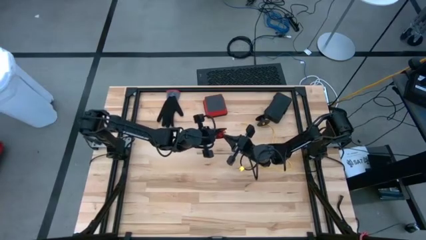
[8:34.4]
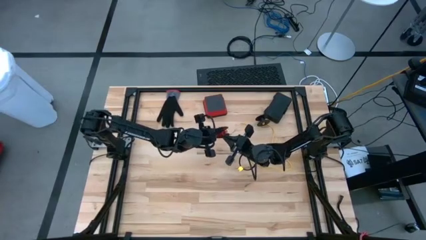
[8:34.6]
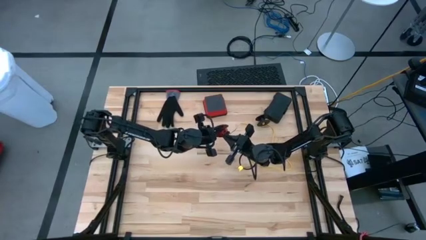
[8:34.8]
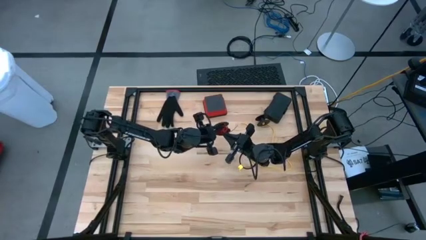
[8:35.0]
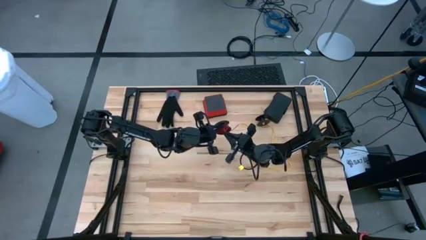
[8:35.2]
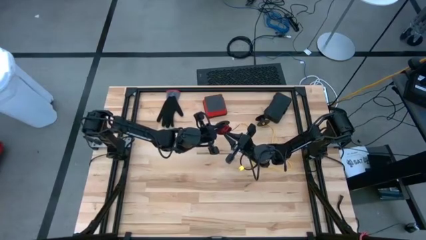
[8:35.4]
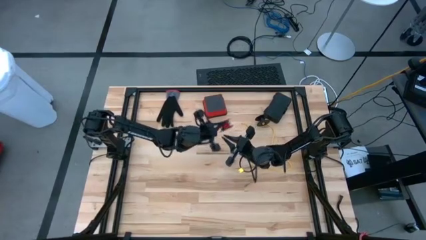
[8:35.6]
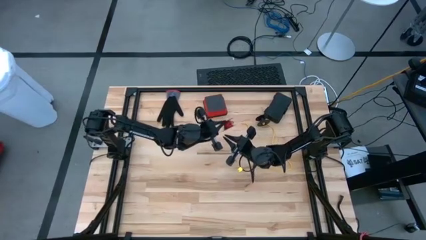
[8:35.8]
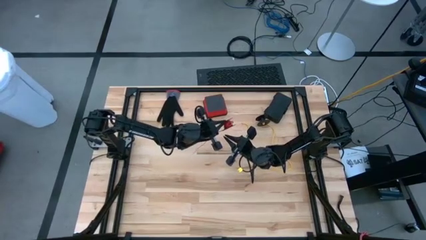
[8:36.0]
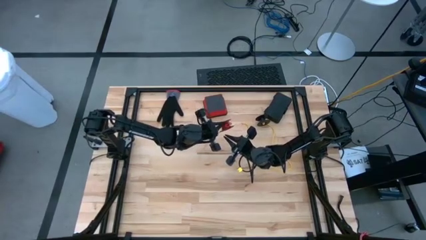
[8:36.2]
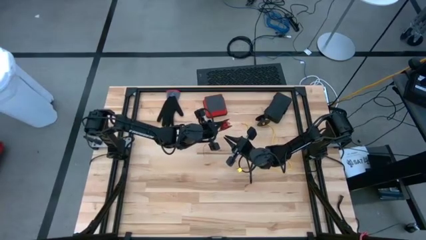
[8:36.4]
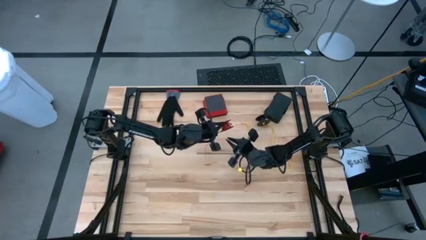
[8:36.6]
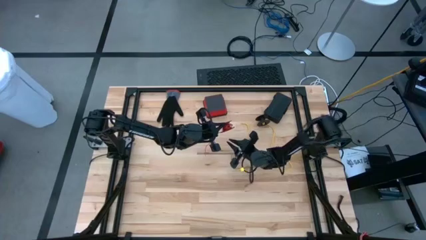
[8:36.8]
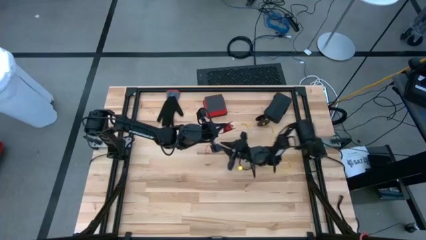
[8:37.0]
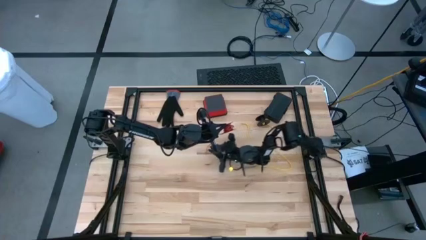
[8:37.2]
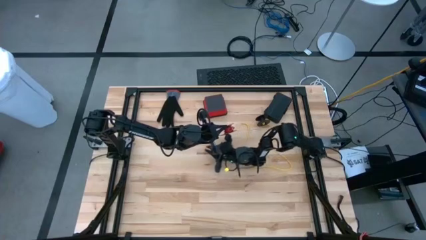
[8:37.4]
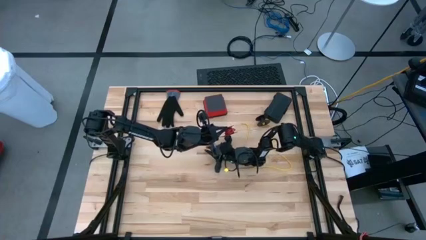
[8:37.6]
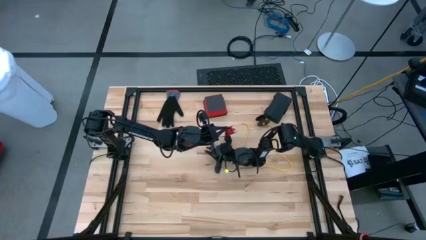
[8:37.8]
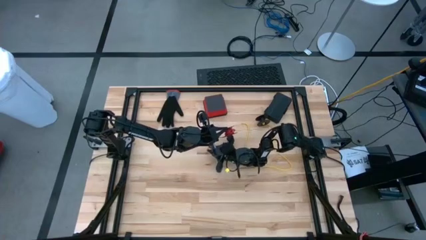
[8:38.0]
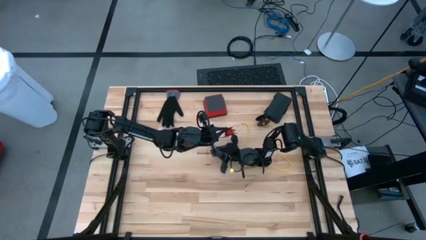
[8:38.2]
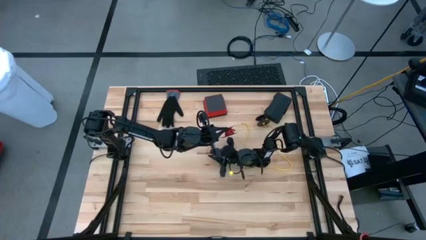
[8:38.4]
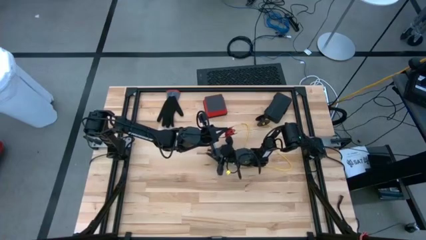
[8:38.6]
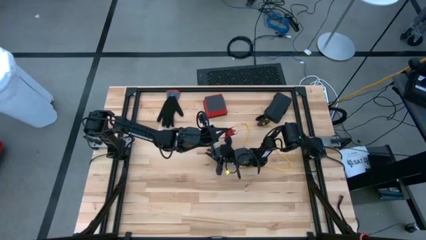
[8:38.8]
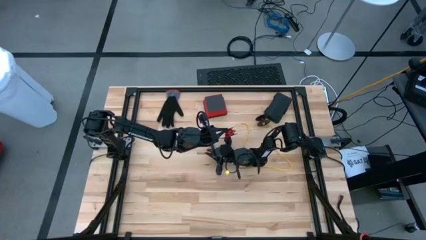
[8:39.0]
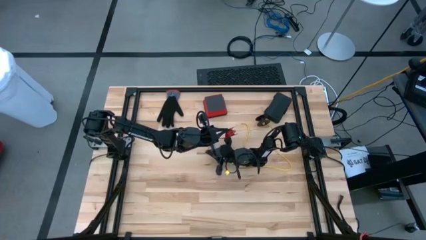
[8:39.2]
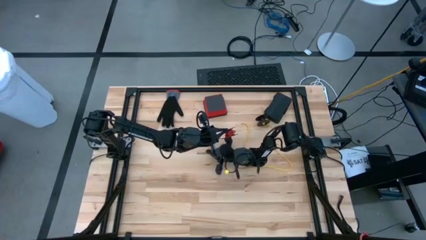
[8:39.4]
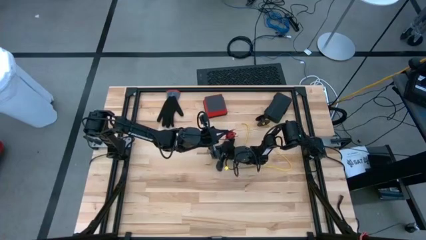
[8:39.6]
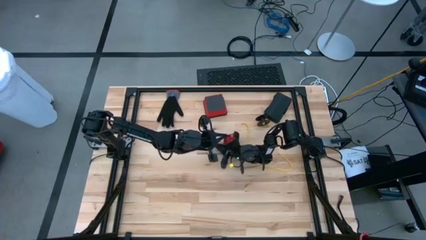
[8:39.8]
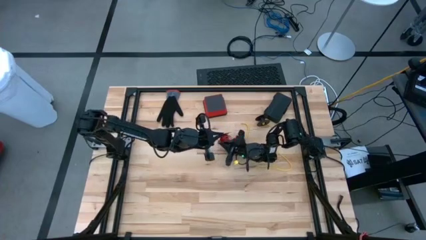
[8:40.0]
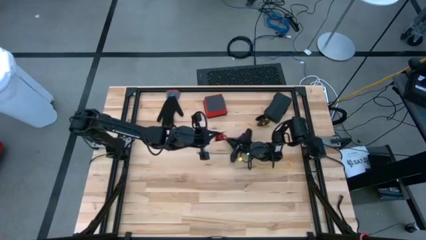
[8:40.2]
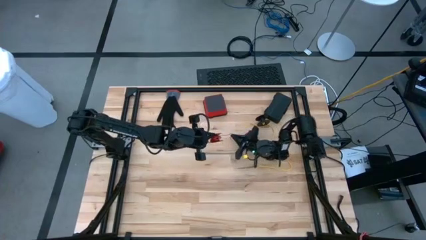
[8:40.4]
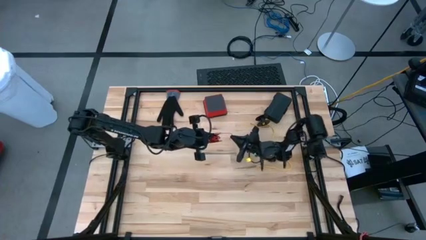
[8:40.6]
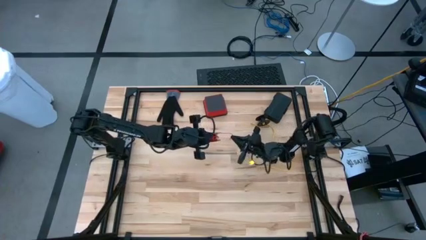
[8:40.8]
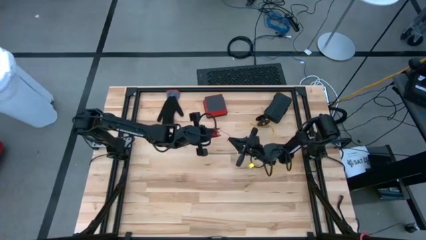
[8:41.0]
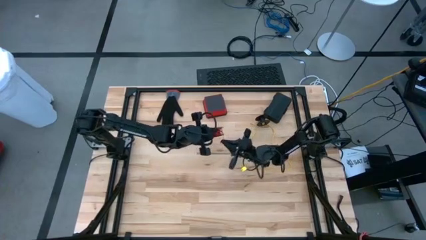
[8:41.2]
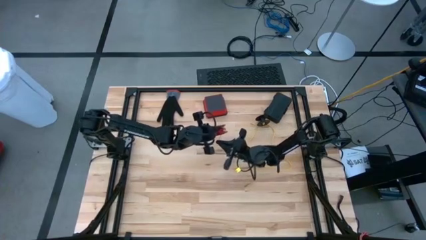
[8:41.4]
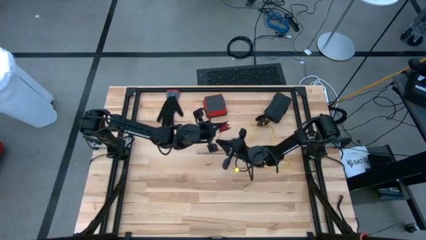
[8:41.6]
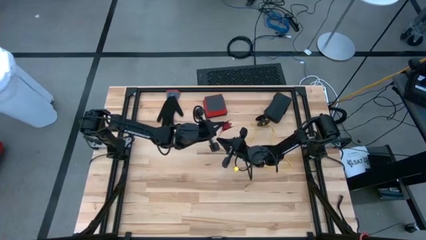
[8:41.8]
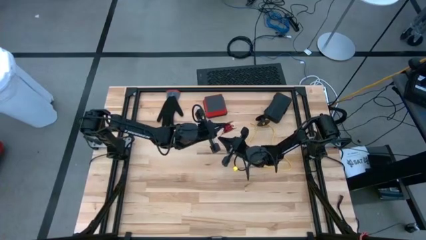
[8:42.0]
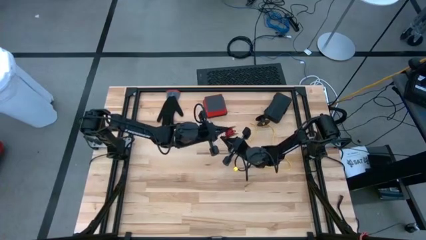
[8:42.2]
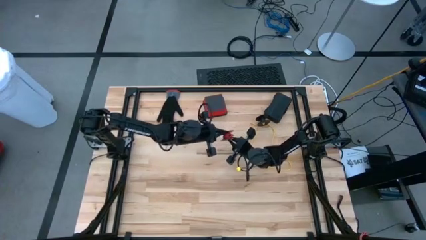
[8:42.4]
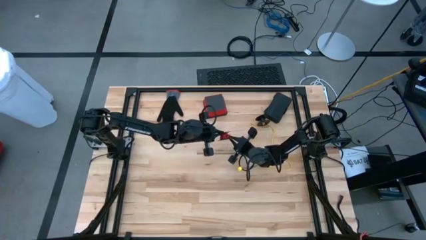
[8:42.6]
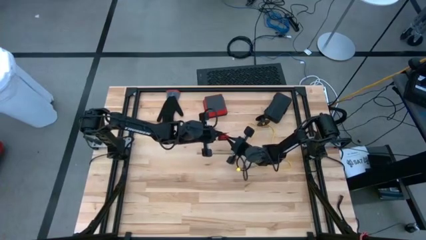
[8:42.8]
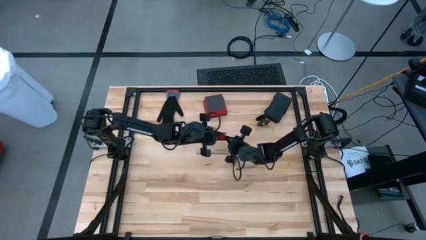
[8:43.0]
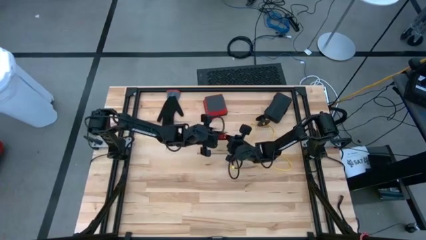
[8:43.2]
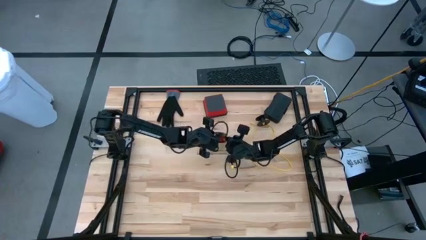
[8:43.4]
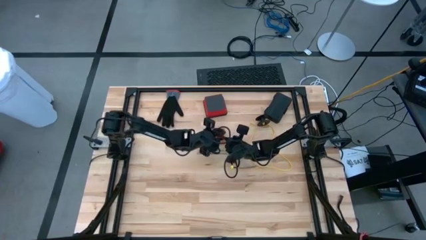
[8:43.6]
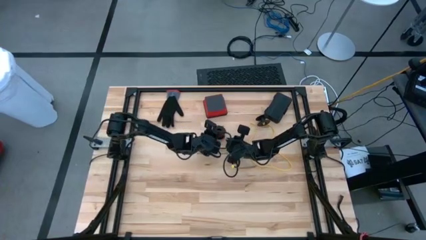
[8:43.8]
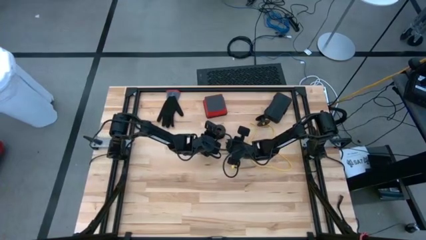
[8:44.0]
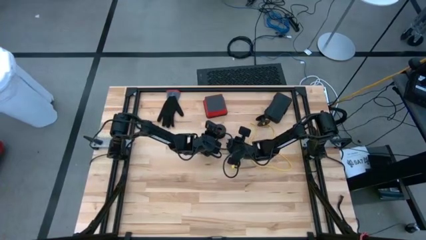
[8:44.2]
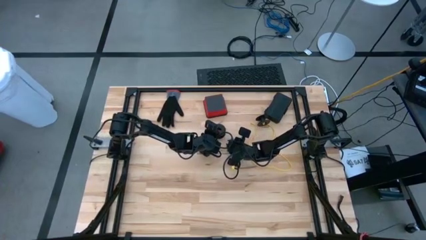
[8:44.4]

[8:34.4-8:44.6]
Task: Coil cords
Coil the red wire onto the spool

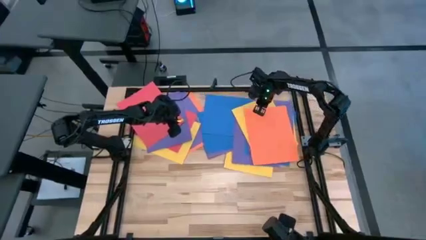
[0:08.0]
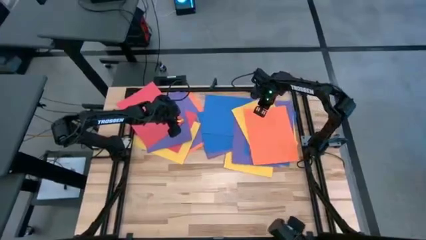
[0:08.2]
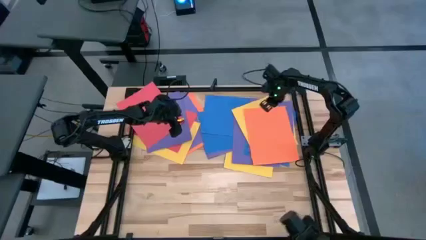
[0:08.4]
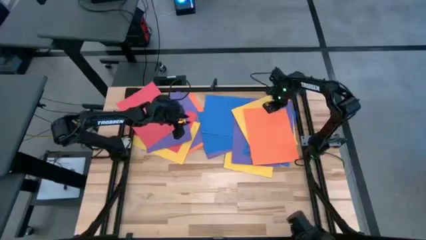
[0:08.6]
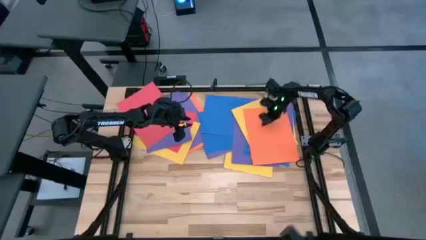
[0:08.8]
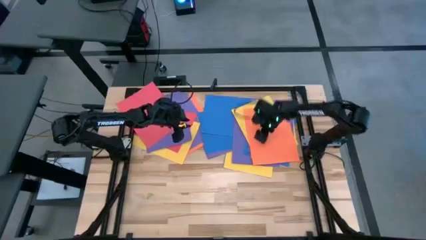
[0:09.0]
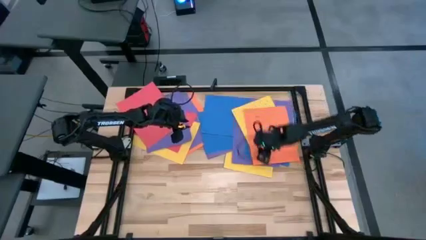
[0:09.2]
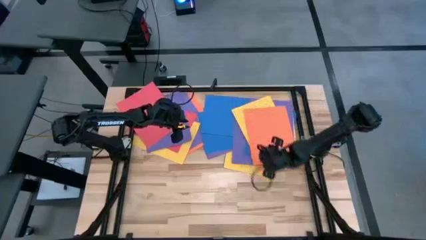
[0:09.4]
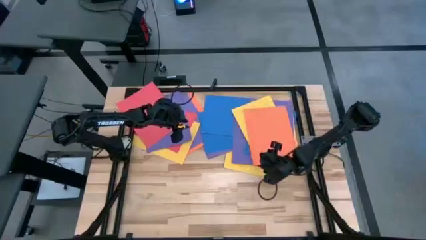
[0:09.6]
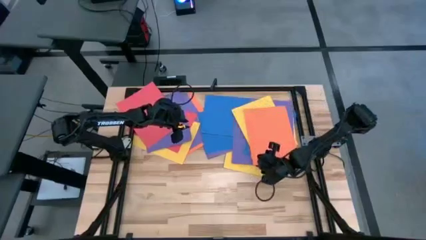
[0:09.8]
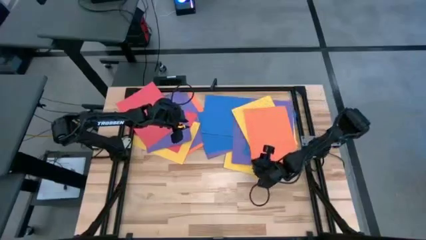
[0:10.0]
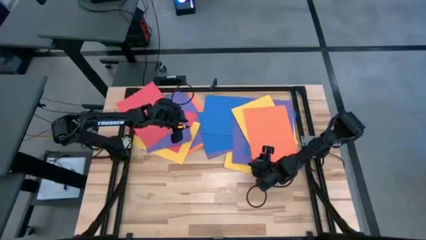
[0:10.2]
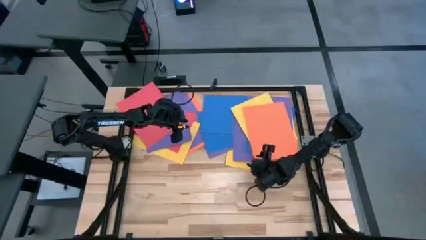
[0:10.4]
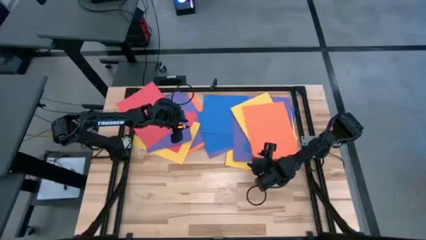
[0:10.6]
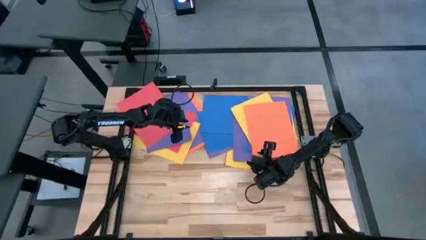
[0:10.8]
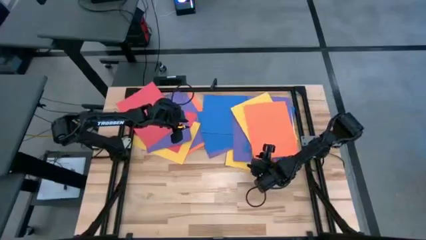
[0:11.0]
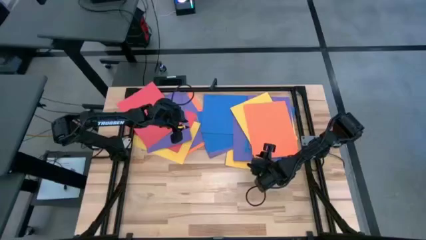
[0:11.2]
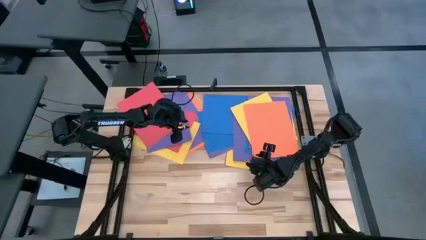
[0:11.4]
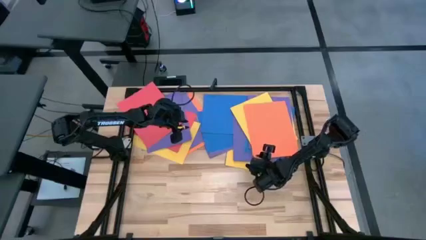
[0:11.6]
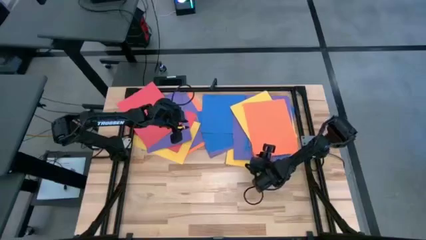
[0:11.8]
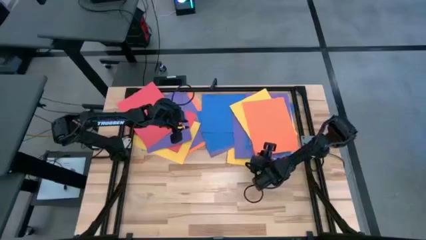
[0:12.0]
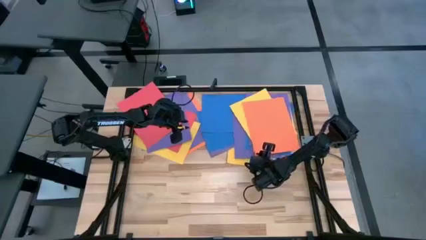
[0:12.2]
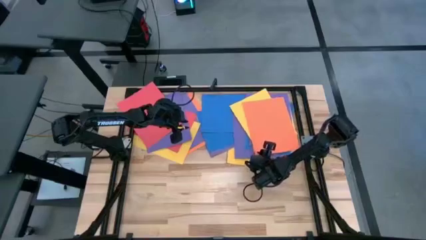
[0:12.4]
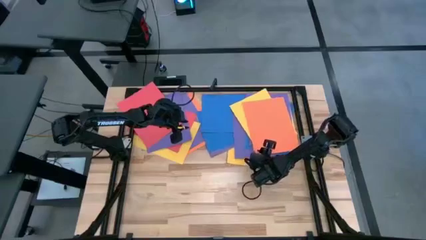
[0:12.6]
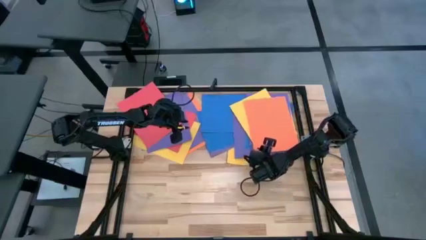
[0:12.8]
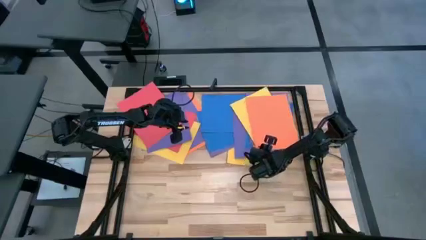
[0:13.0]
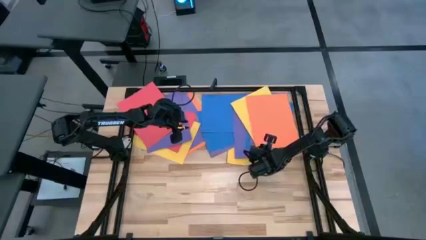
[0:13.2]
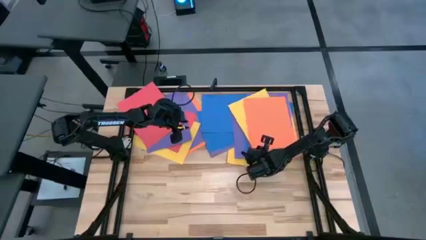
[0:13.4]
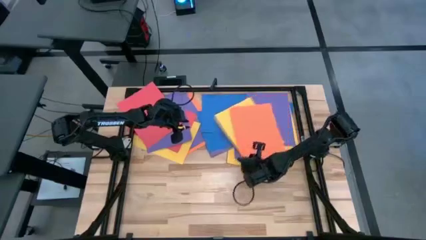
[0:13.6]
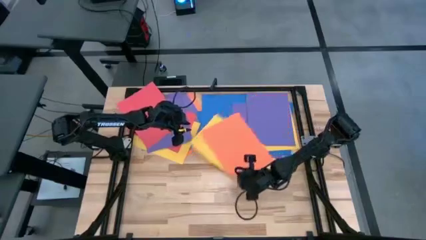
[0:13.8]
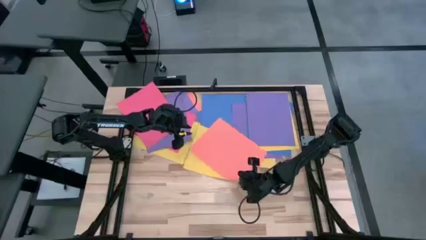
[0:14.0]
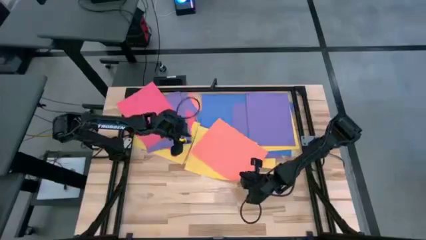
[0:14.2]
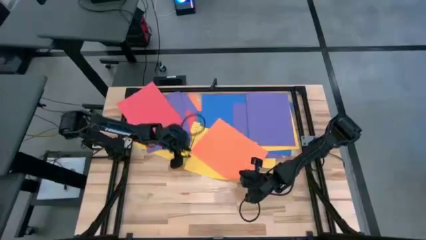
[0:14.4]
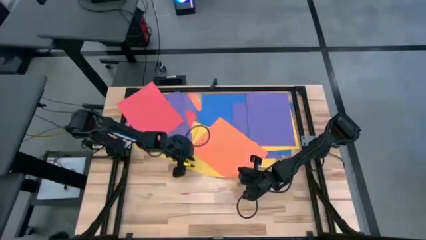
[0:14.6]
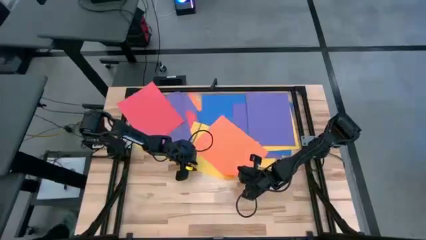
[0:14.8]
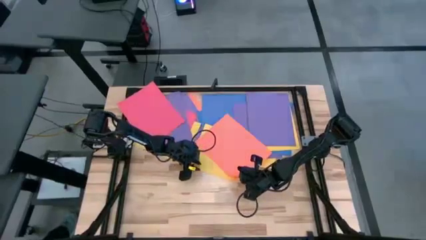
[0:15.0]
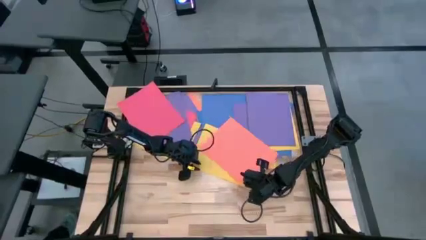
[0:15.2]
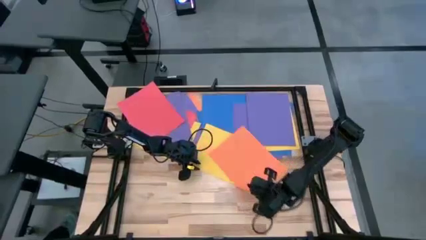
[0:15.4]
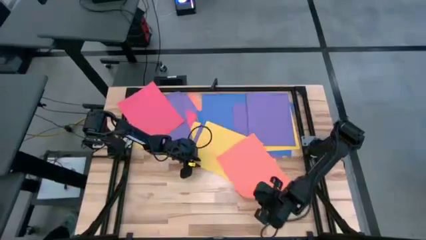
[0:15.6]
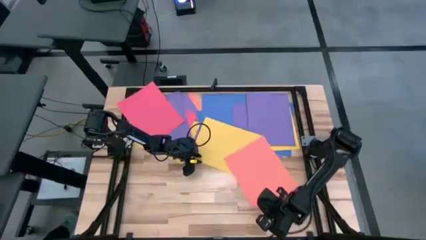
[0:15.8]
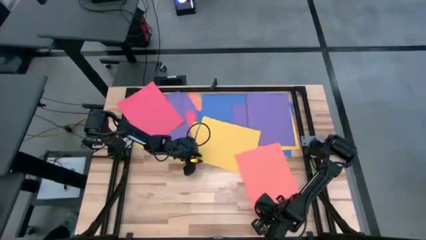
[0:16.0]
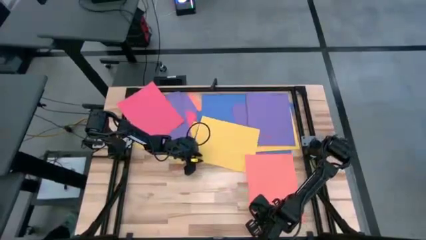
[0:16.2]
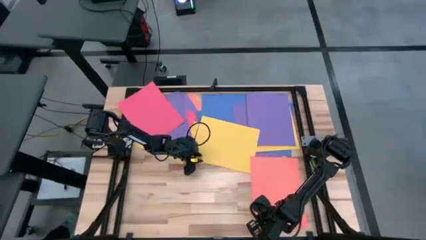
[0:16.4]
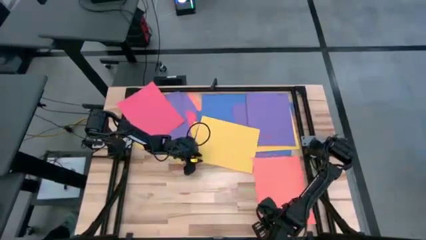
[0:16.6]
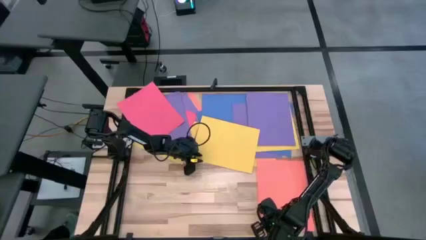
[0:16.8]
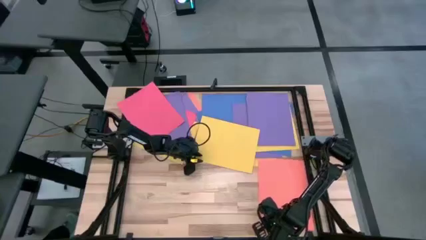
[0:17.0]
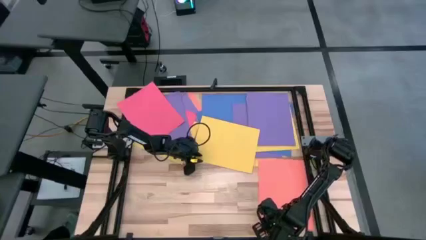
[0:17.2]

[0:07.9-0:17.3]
Task: Organize paper
Put the orange paper to the bottom right of the table
